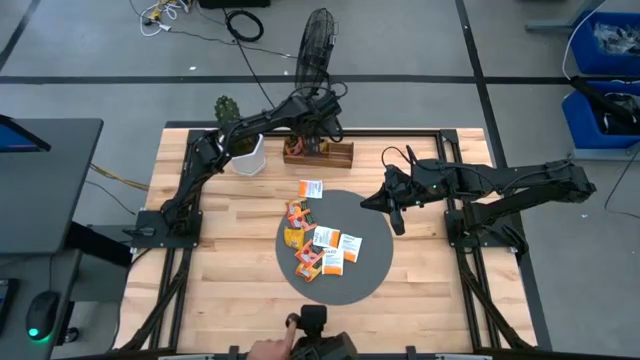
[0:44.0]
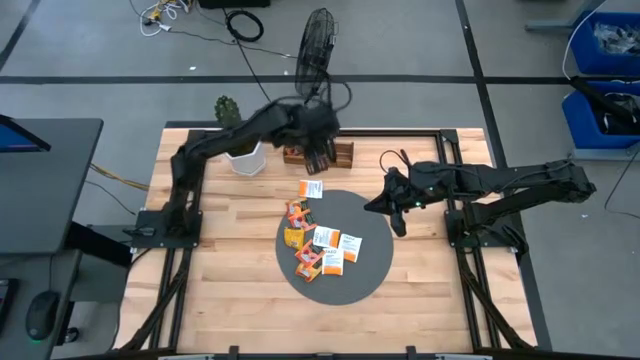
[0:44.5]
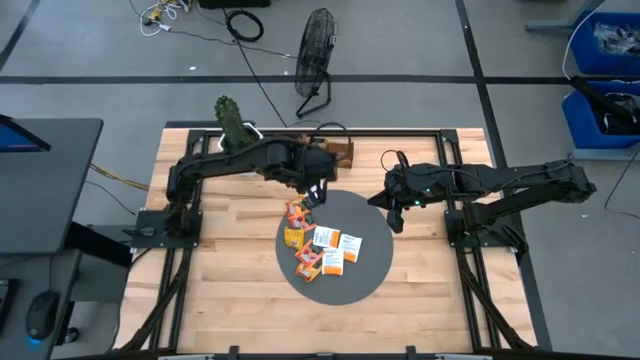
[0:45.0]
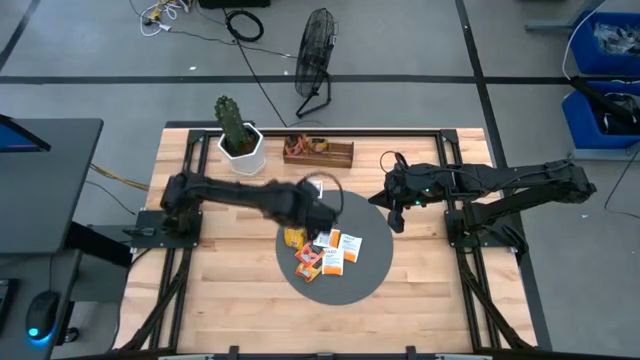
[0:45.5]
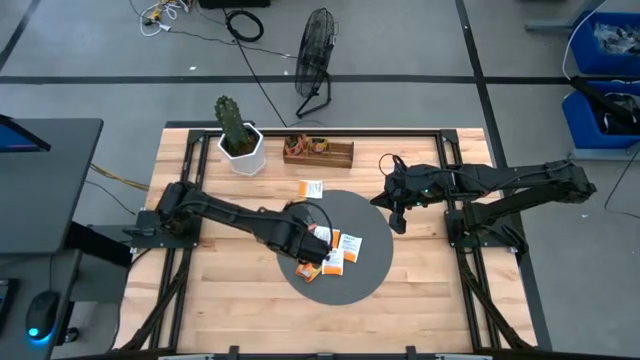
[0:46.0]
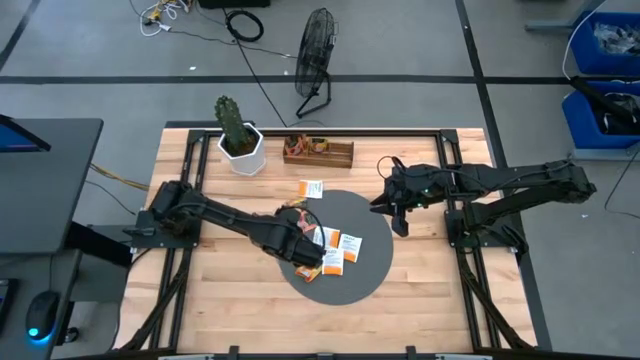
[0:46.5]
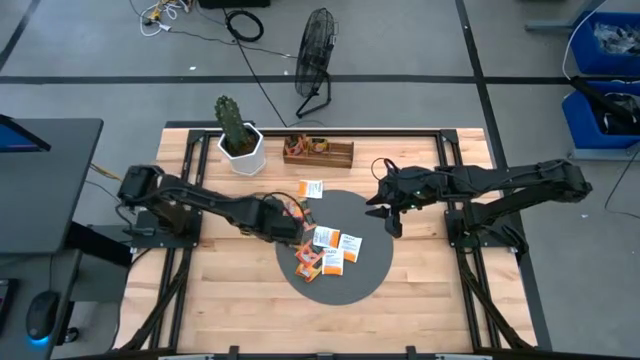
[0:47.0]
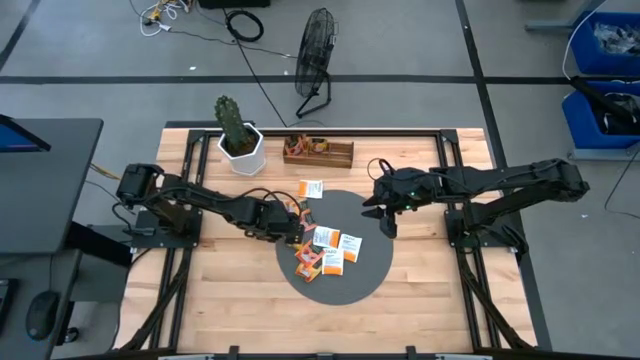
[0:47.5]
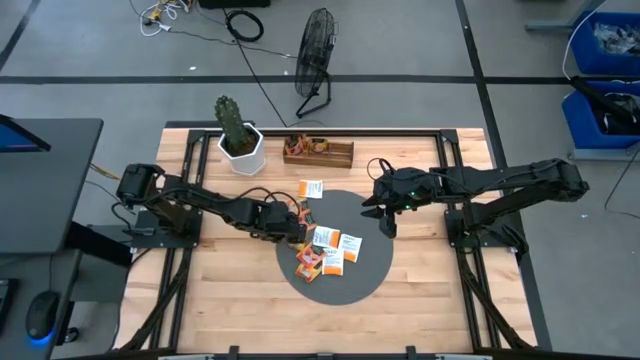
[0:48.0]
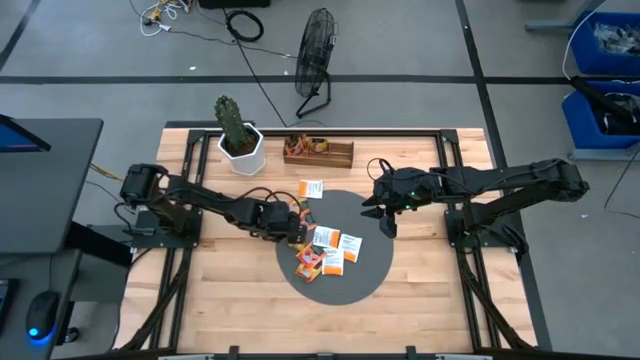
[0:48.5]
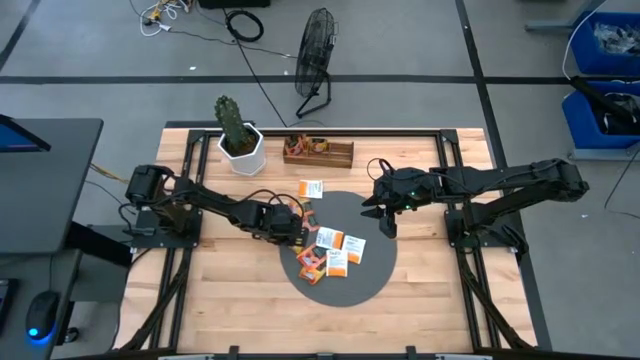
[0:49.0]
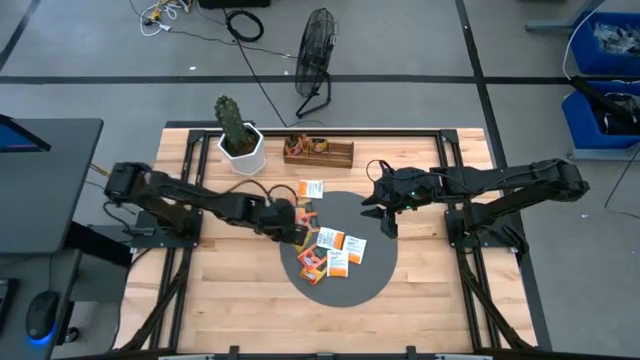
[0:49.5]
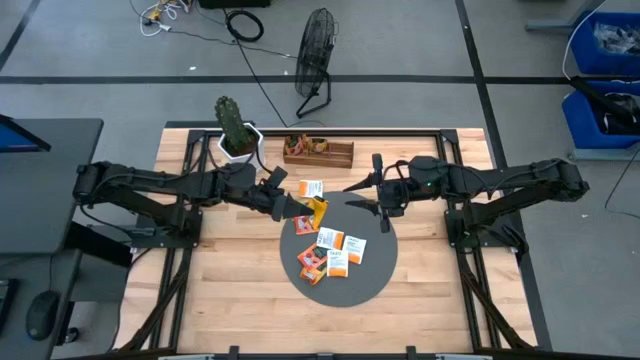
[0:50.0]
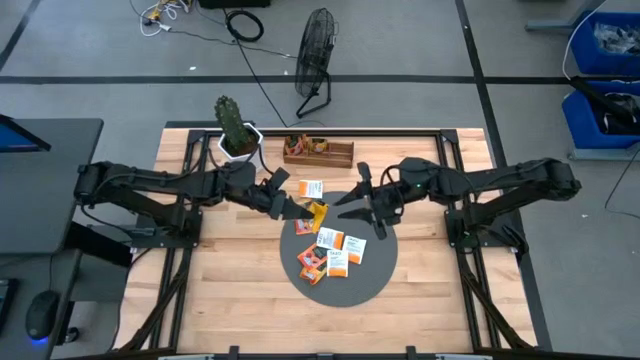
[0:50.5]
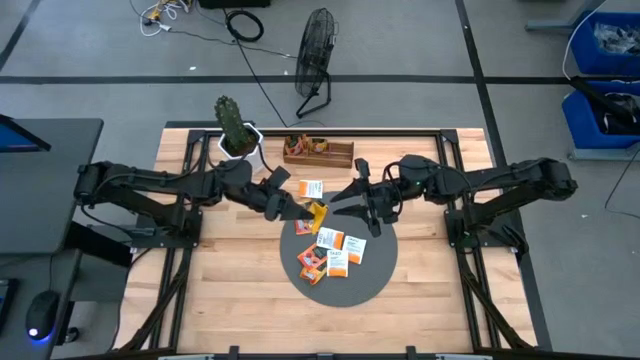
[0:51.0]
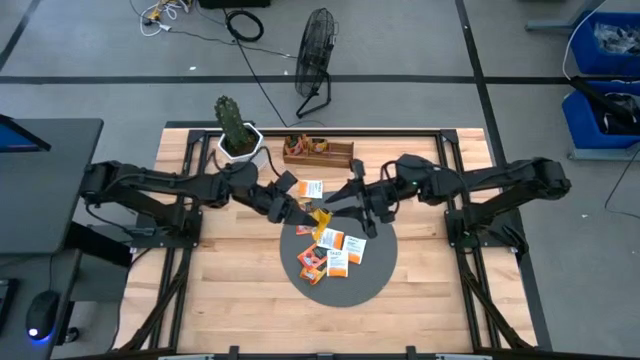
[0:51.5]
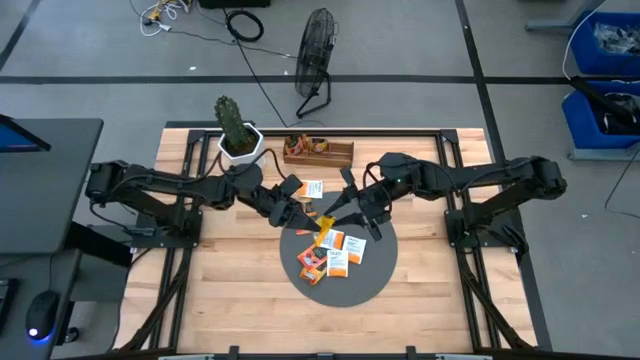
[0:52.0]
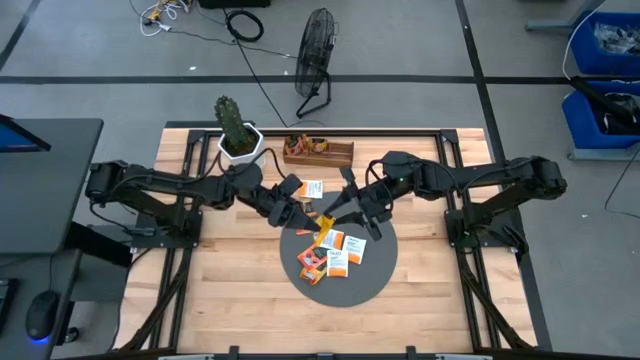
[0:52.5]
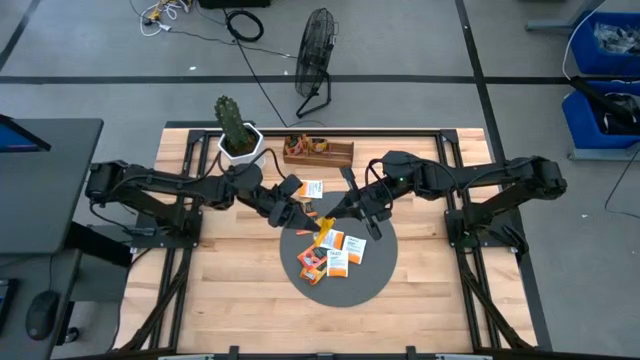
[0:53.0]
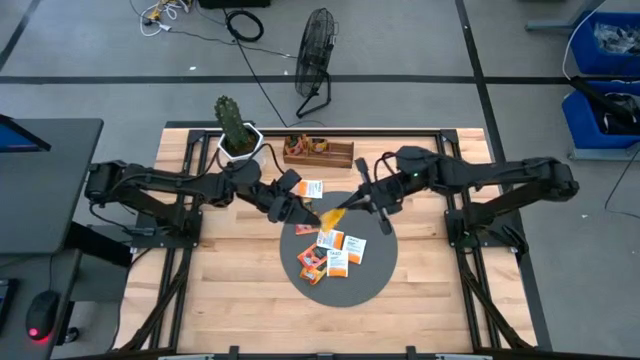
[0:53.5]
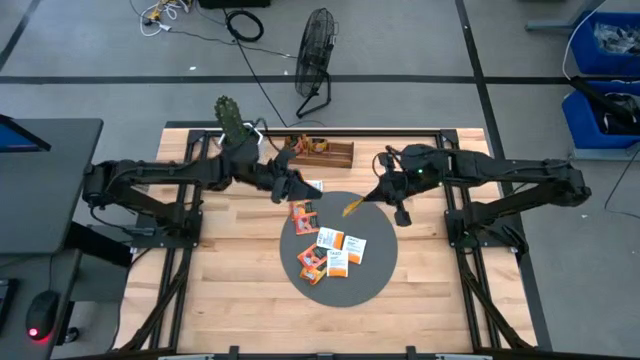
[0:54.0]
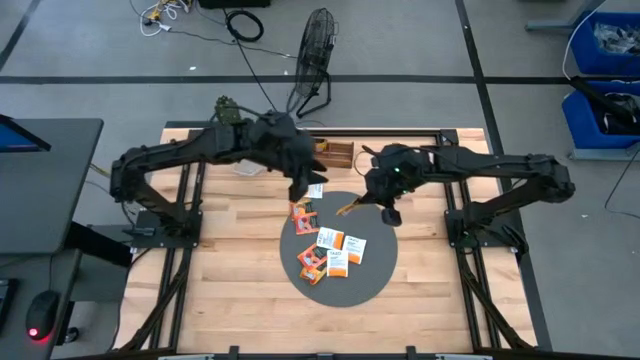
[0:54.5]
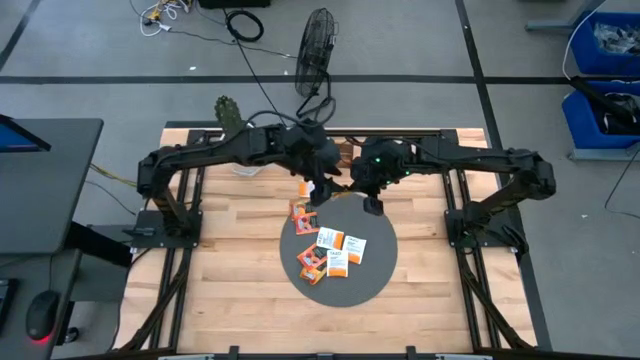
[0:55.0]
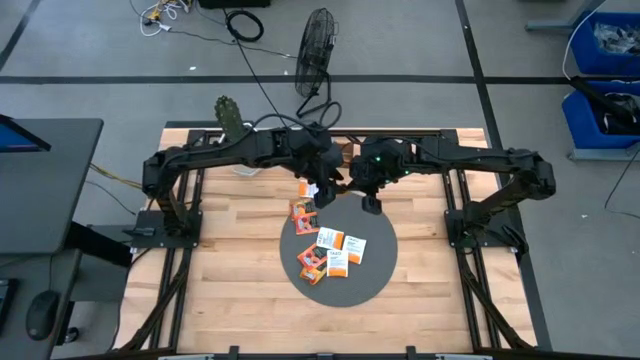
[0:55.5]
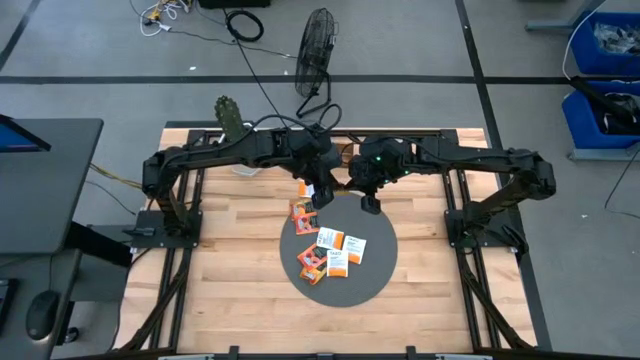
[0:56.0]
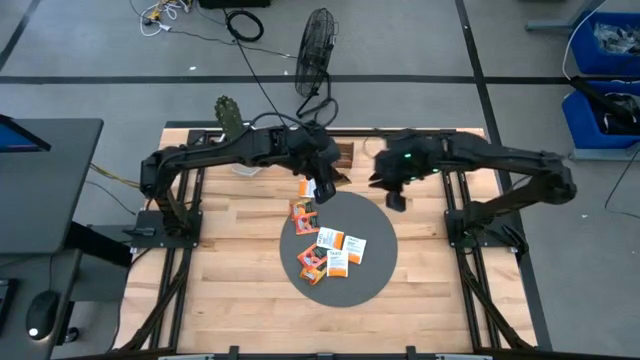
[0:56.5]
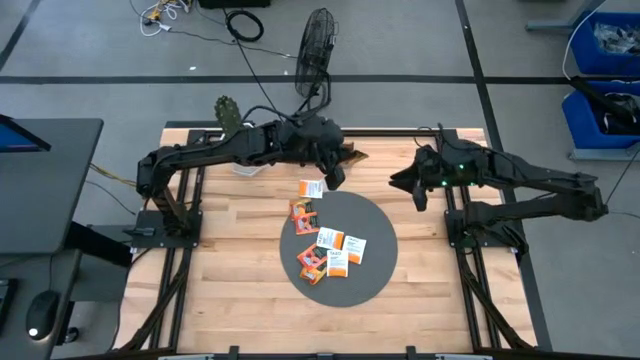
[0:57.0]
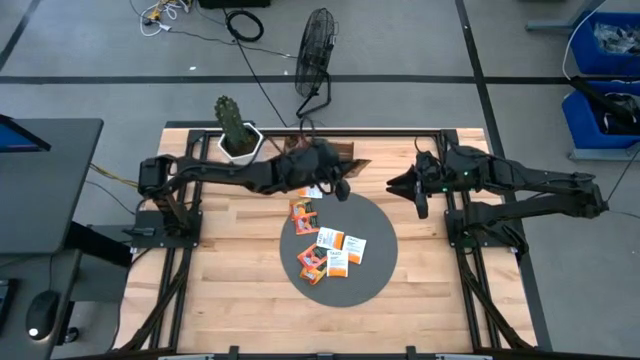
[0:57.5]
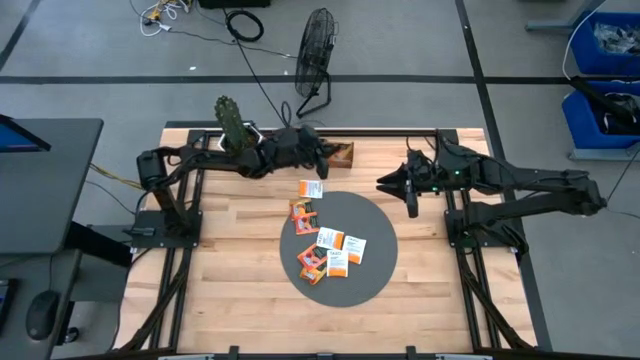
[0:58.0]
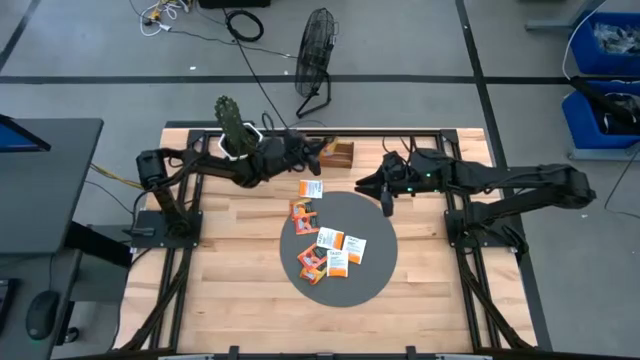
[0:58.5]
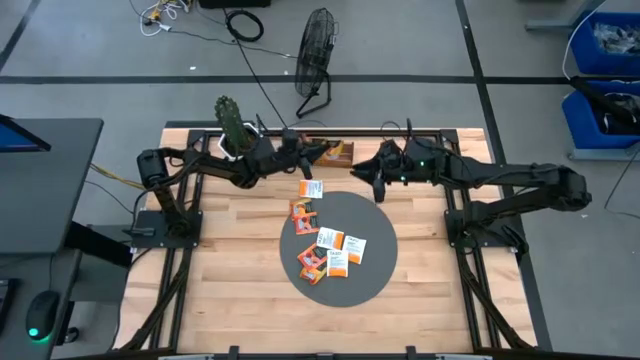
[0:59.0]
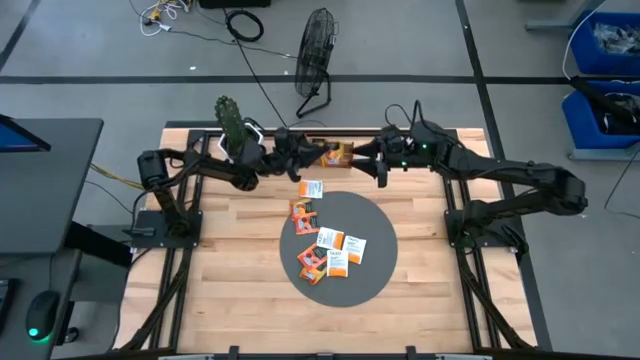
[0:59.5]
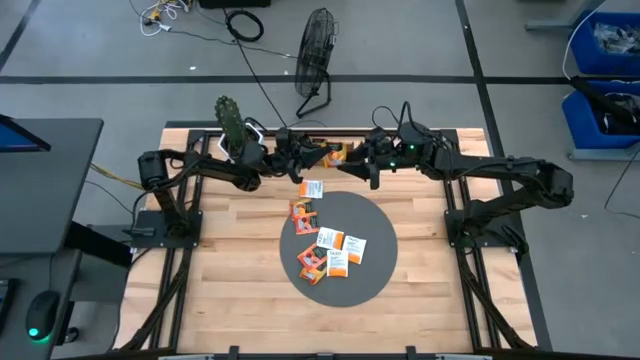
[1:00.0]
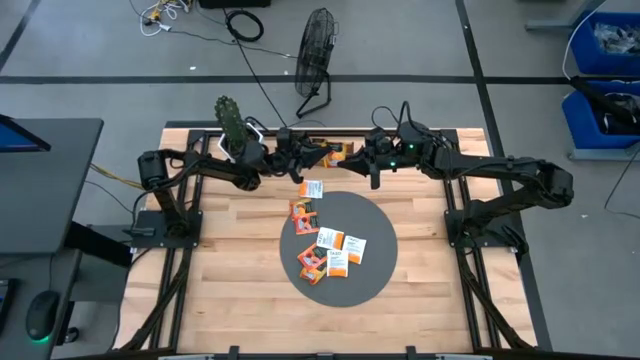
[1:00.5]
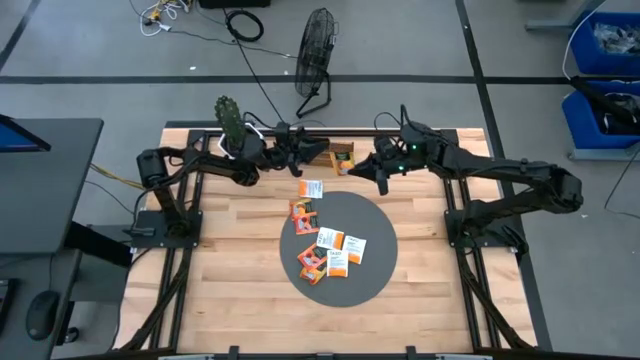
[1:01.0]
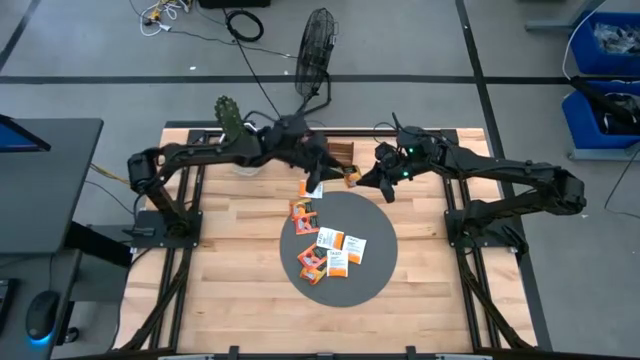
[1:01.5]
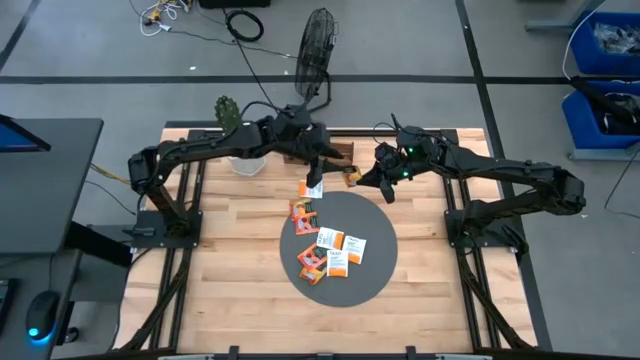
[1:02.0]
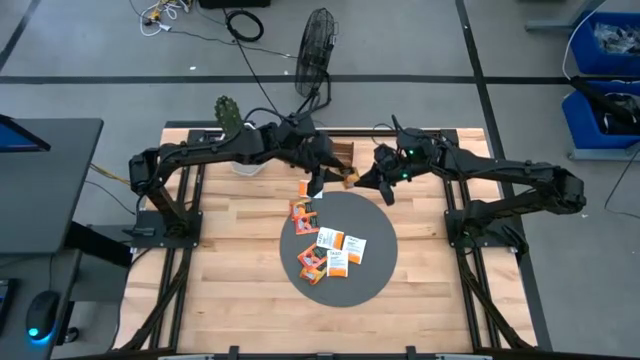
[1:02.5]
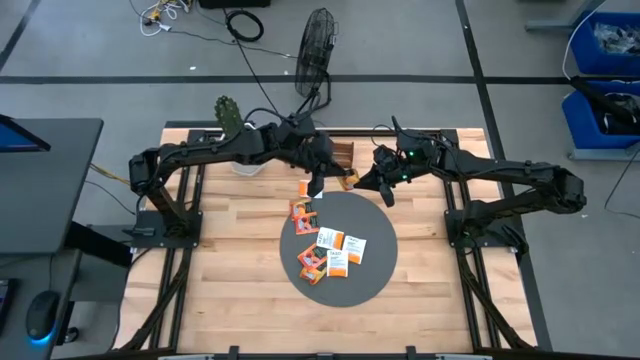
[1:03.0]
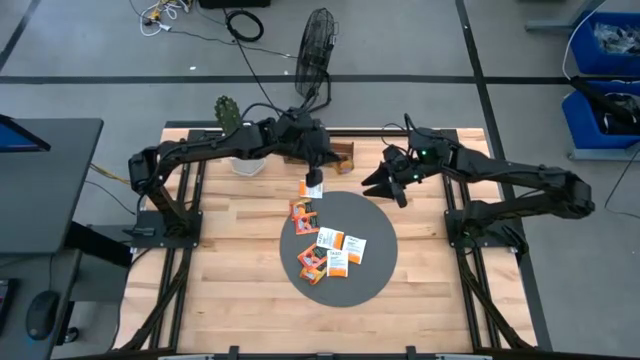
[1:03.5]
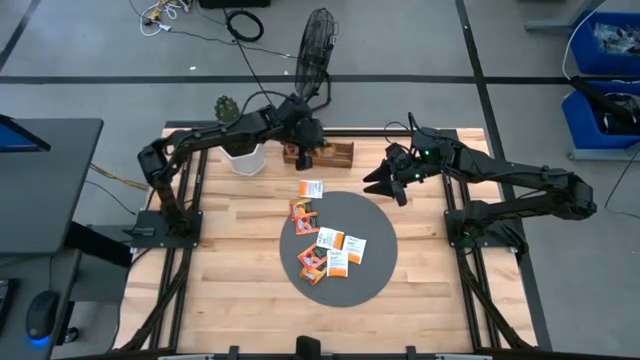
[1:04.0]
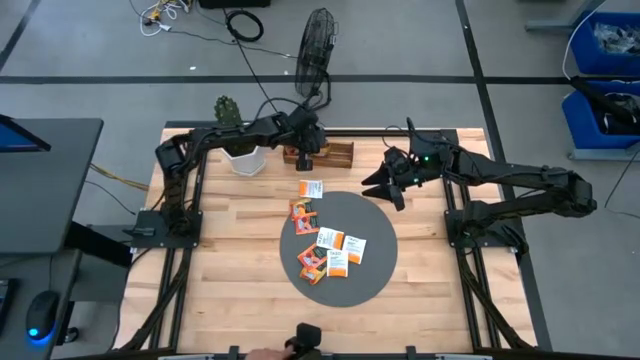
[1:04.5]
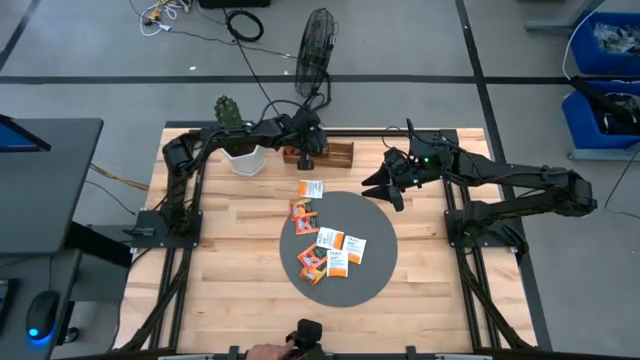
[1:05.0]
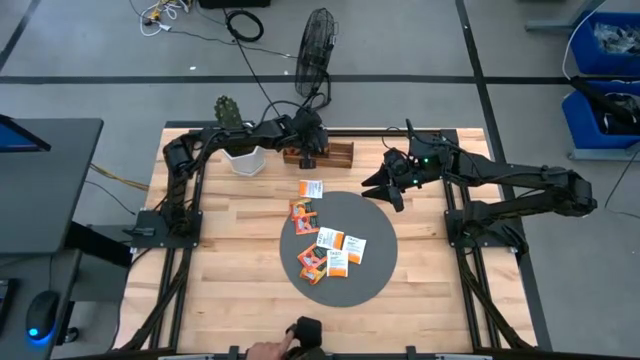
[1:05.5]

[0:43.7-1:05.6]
Task: Pick & Place Tea
Put the yellow tea bag into the middle section of the wooden organizer
